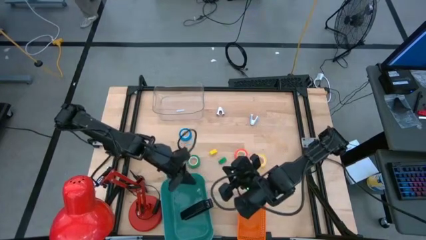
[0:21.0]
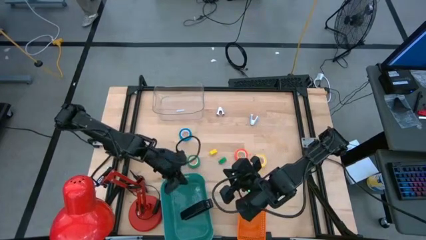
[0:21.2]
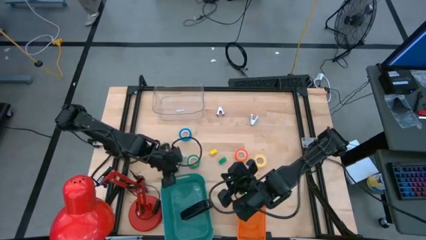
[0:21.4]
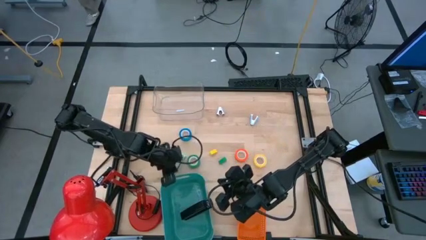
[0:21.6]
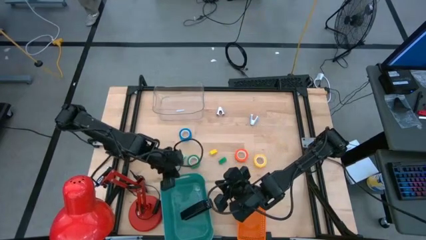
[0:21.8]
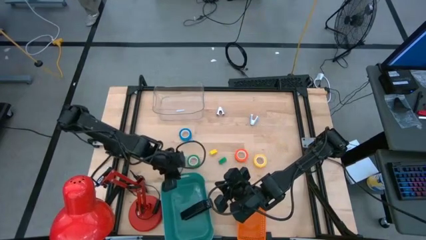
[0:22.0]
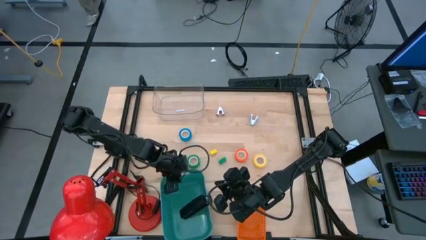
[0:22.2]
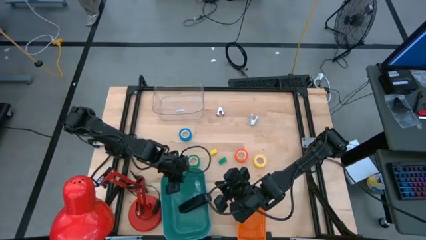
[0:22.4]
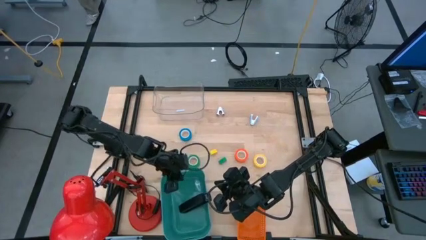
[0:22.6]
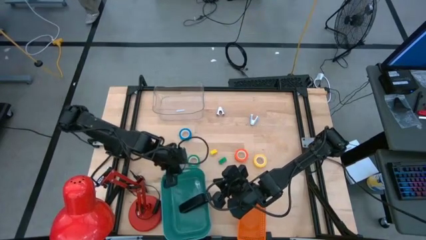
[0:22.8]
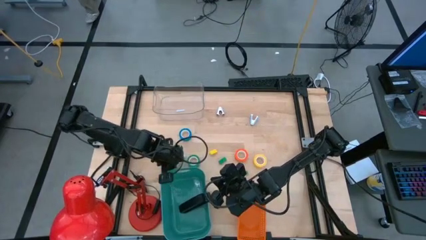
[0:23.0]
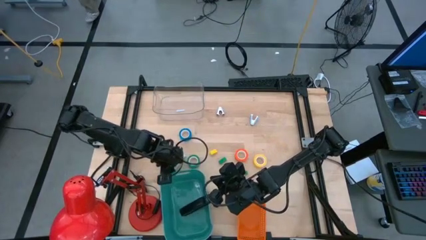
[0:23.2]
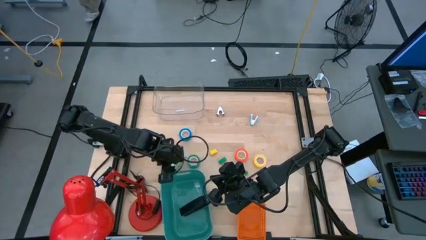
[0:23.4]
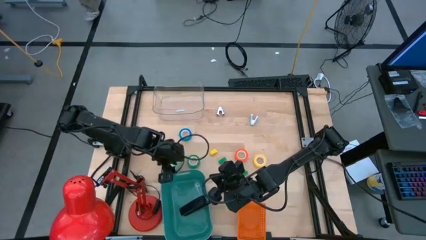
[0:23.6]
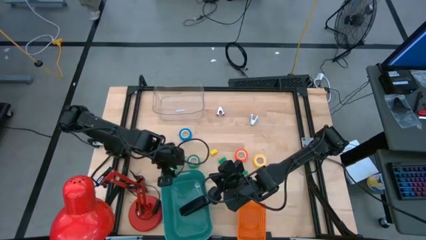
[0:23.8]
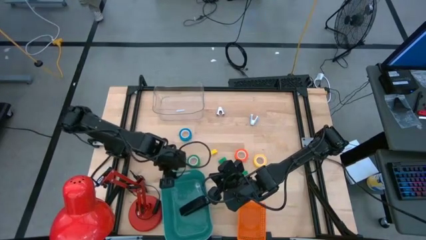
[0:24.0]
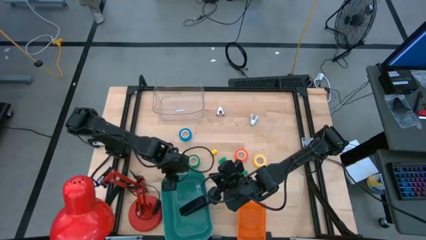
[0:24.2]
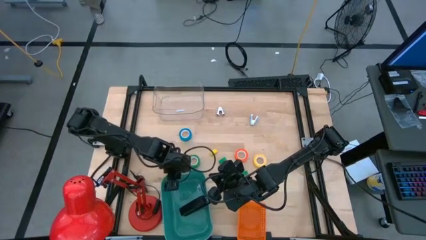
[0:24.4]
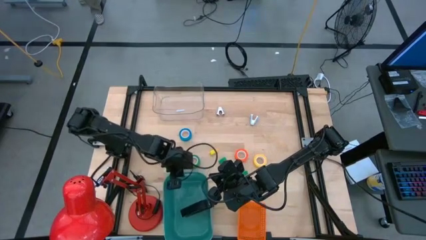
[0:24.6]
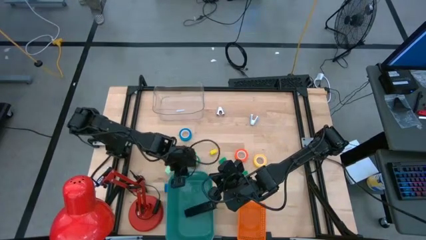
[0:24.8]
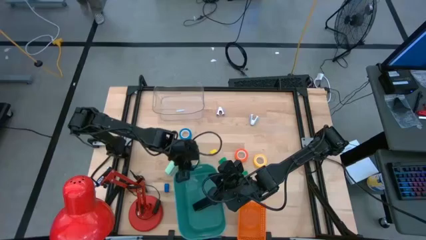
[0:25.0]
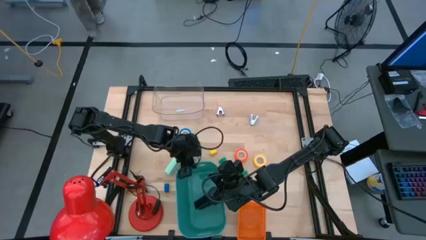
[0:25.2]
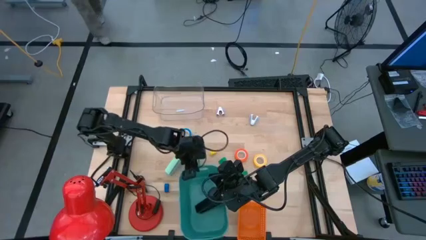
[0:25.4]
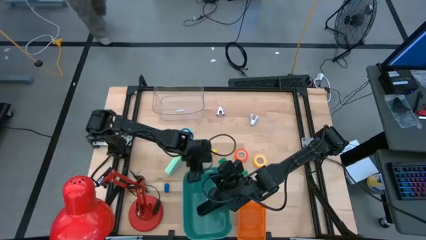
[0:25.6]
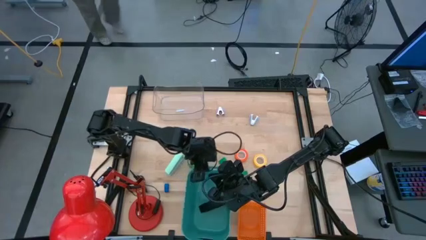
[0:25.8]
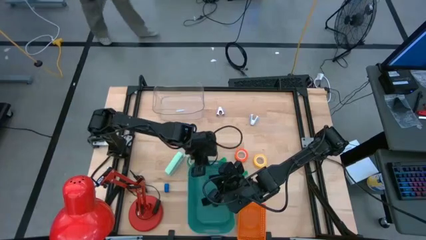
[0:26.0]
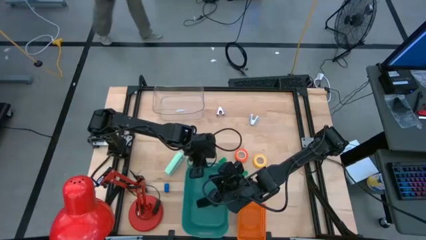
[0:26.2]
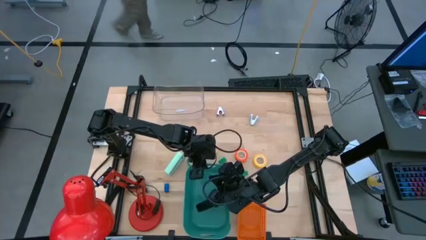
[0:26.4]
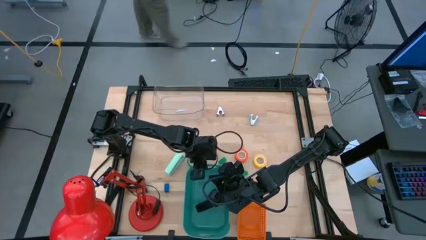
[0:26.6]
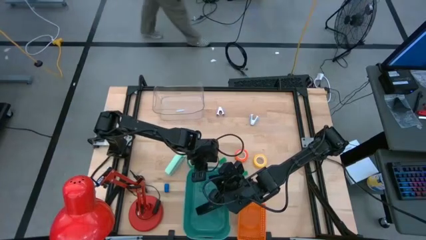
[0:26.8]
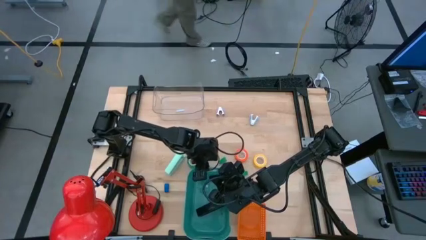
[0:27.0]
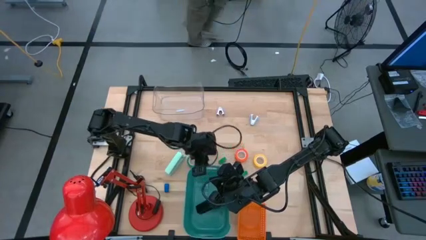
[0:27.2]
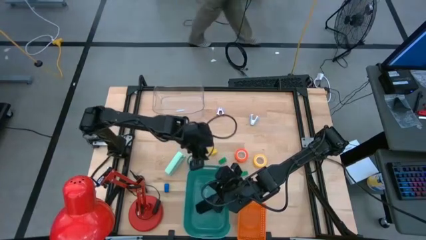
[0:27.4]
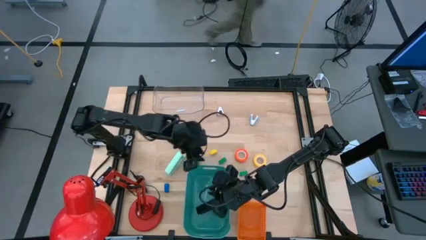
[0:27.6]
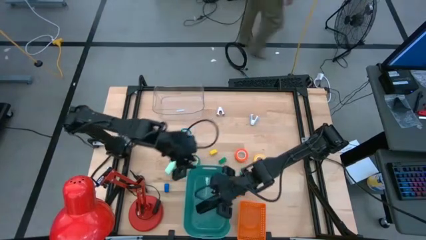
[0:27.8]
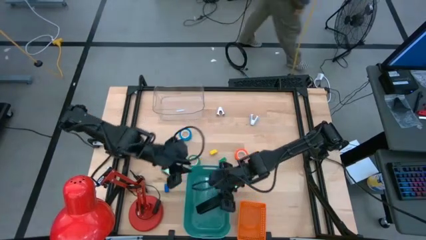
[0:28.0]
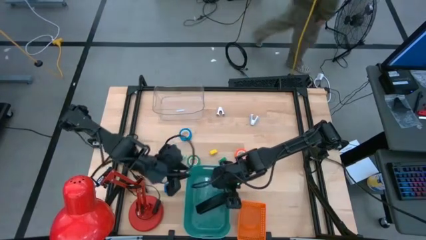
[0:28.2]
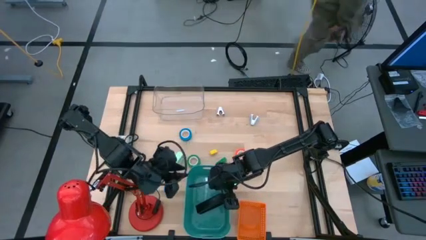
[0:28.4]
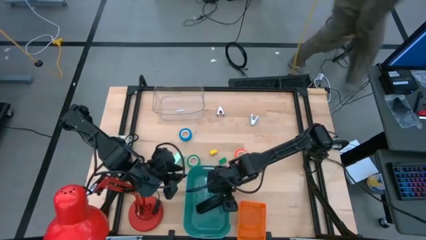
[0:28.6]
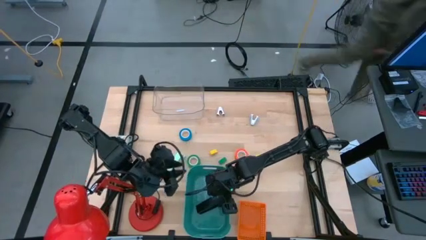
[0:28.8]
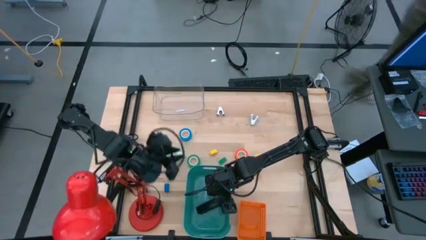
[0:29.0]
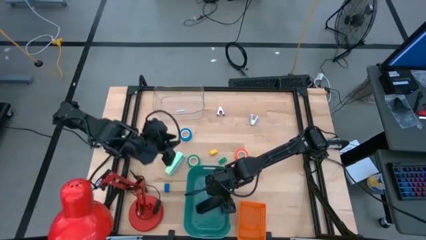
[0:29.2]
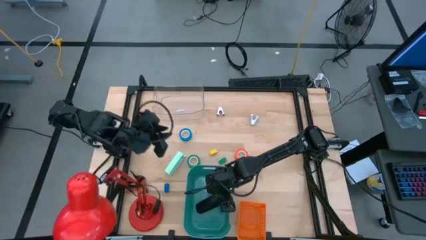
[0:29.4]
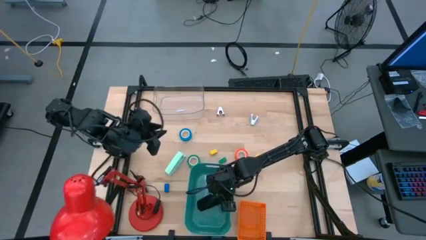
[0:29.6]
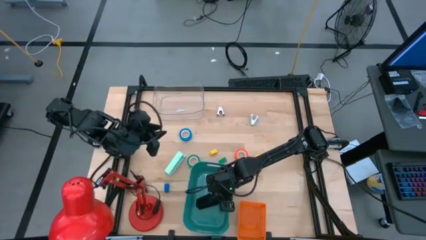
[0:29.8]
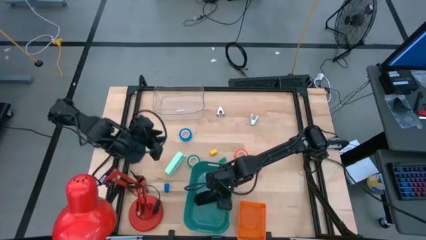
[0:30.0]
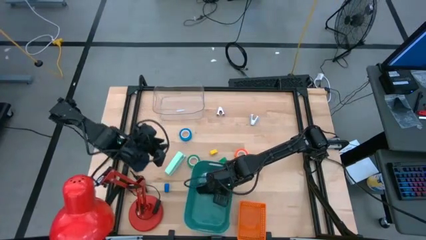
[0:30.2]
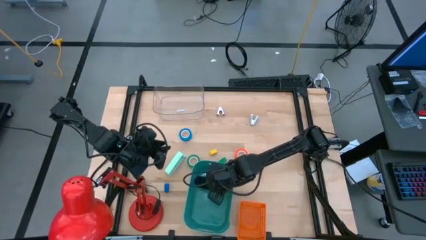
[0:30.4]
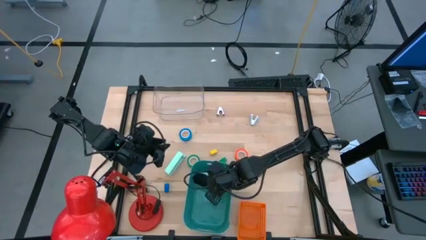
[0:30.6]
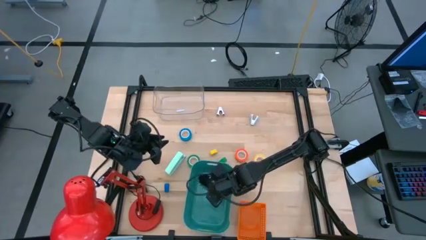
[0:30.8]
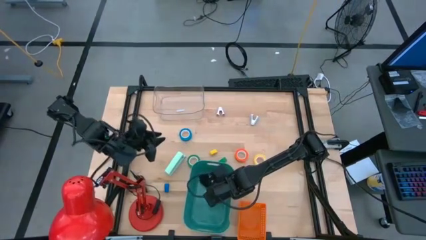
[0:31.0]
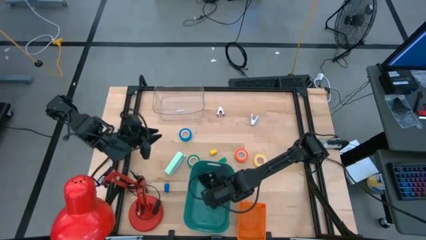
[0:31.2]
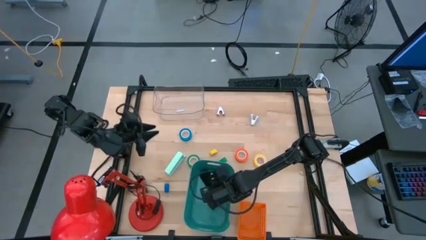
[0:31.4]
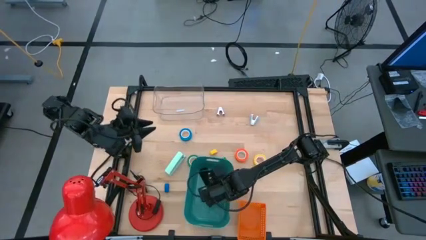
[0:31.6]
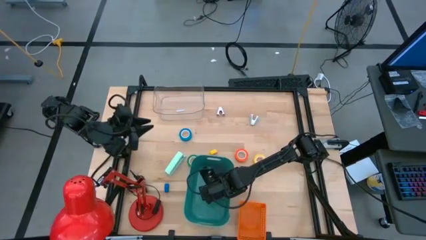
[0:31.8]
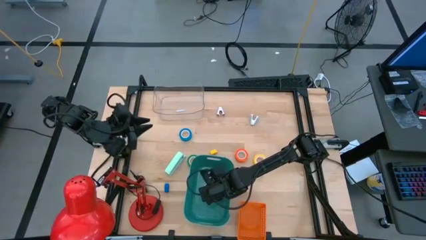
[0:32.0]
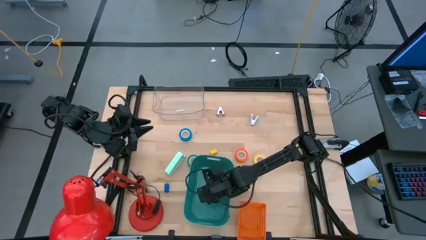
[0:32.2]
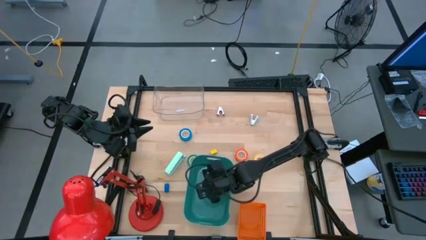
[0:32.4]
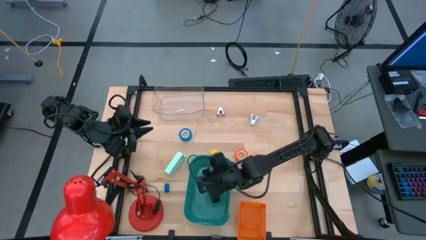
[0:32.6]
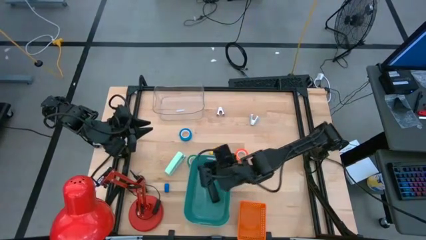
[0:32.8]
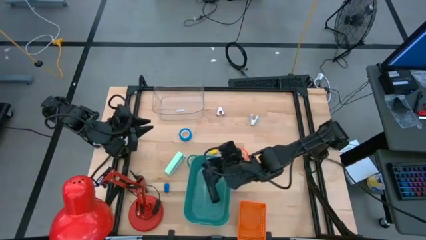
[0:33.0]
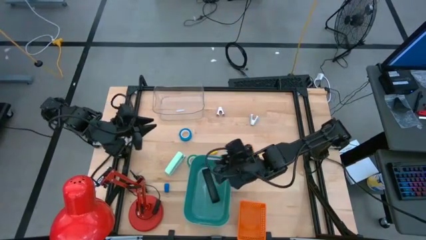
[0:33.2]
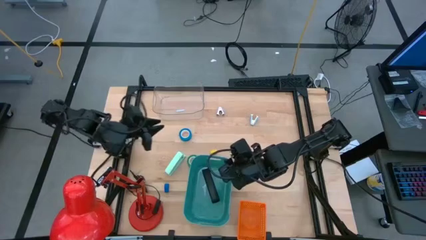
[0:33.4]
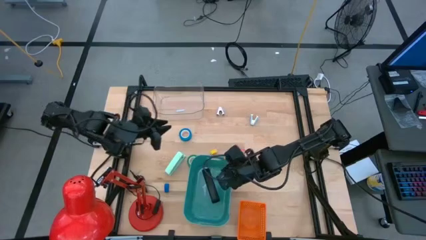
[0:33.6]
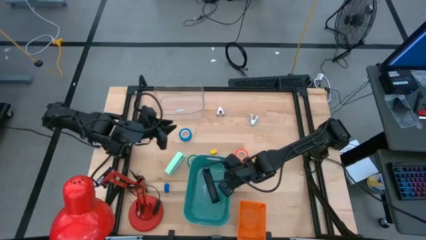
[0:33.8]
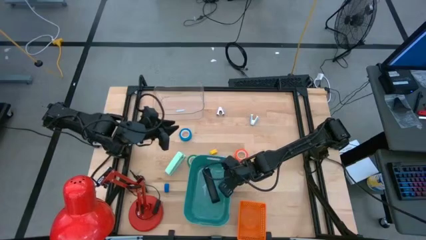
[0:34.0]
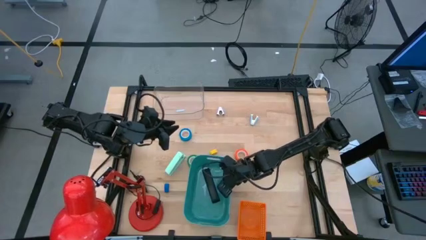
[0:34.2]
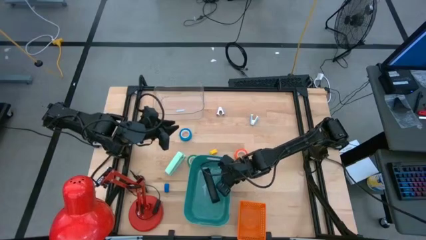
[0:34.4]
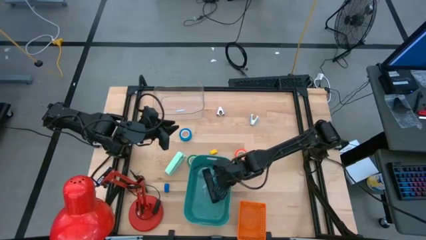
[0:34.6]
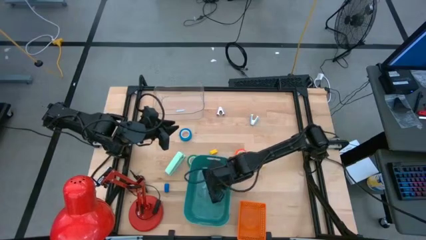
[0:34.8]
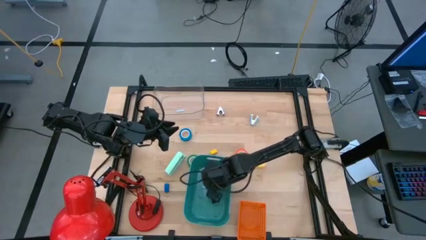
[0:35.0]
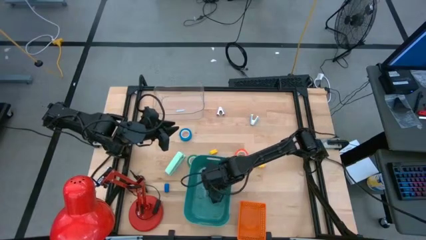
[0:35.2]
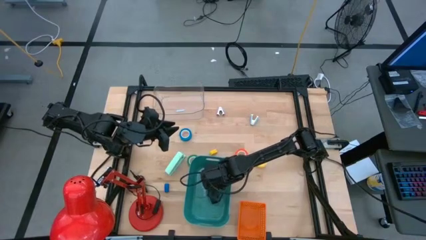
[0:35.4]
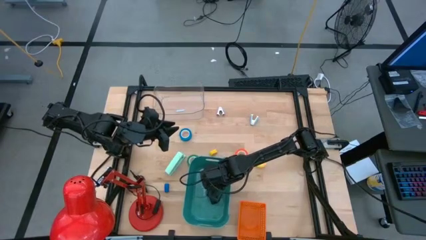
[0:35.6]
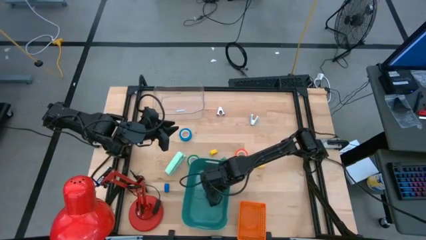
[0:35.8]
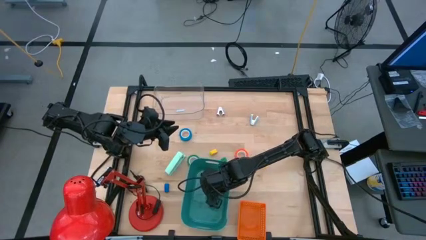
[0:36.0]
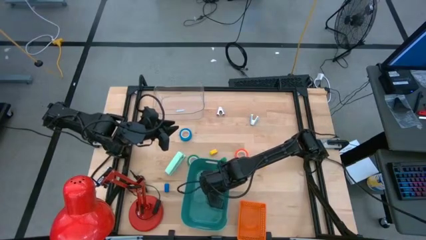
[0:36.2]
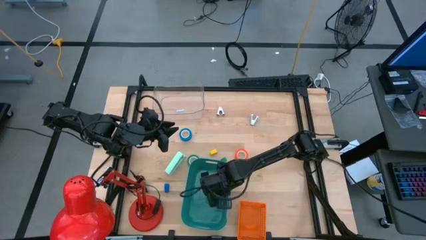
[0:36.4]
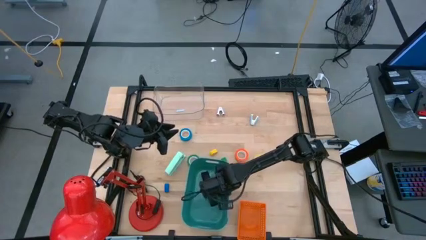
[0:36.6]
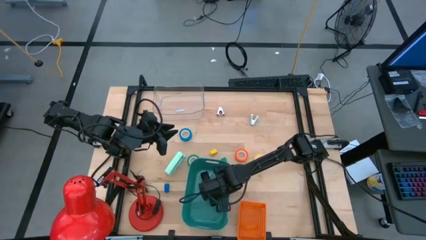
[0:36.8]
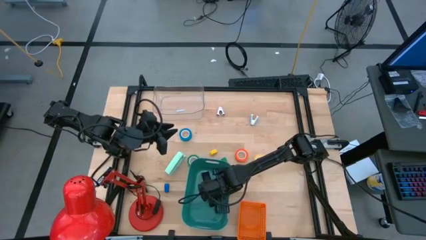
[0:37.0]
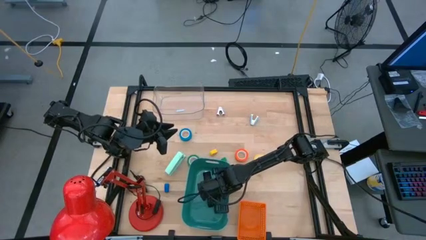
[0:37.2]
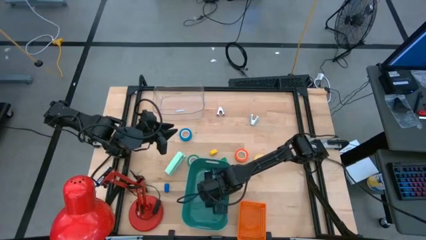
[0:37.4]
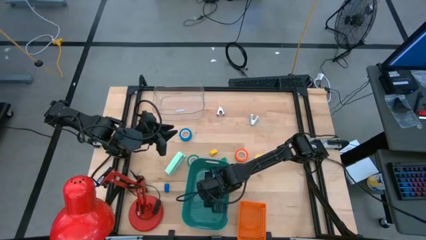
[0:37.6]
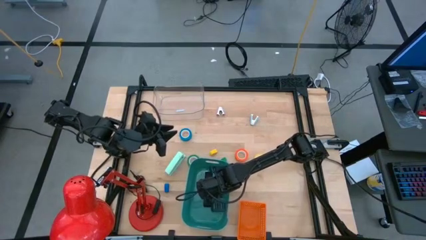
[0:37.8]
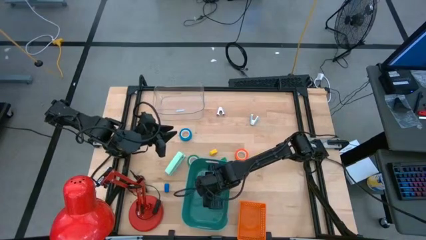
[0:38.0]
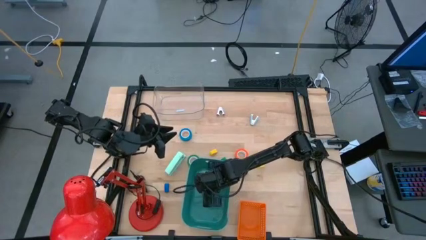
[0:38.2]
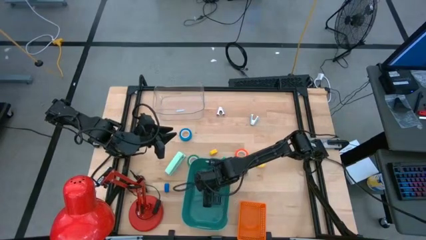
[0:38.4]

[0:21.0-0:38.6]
Task: Pick and place Stapler, Stapler remover, tape
Put the black stapler into the green bin
